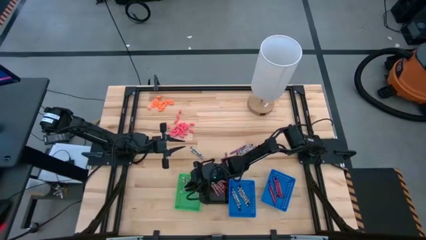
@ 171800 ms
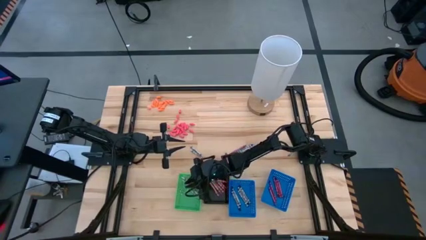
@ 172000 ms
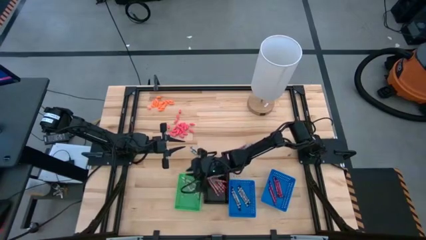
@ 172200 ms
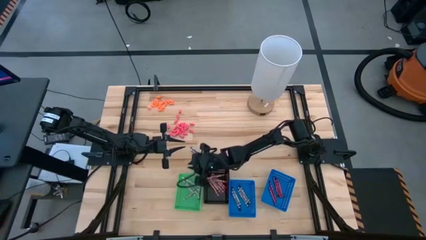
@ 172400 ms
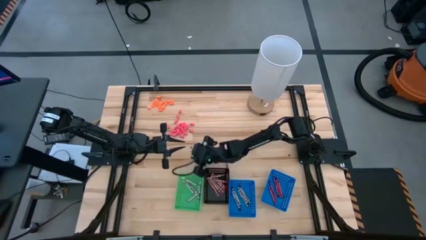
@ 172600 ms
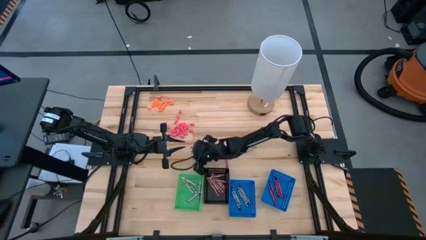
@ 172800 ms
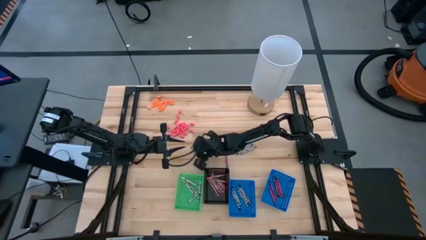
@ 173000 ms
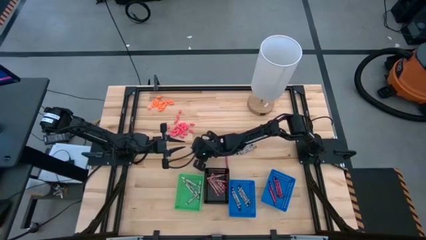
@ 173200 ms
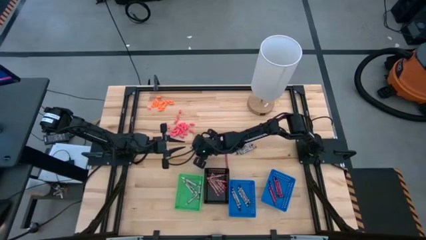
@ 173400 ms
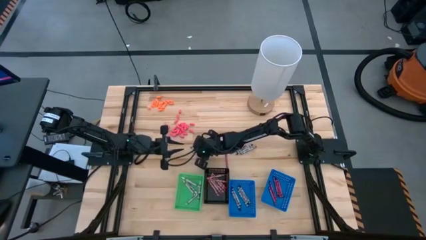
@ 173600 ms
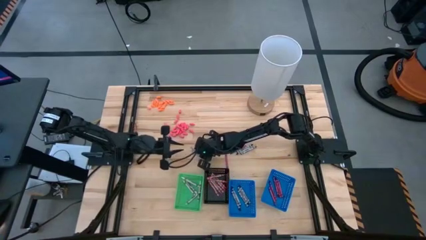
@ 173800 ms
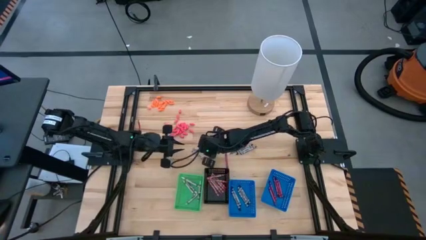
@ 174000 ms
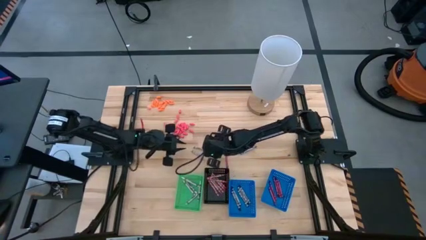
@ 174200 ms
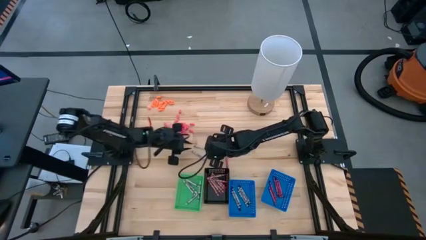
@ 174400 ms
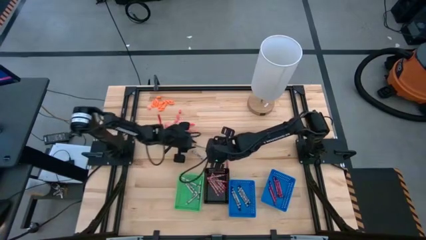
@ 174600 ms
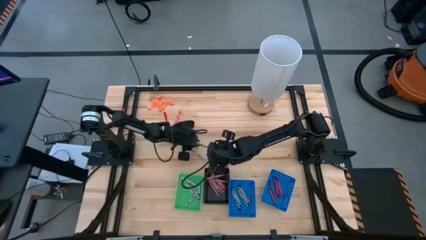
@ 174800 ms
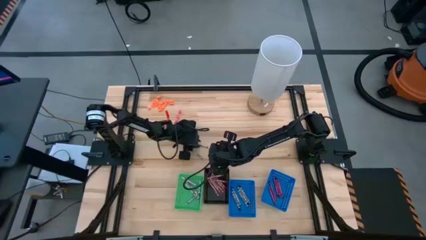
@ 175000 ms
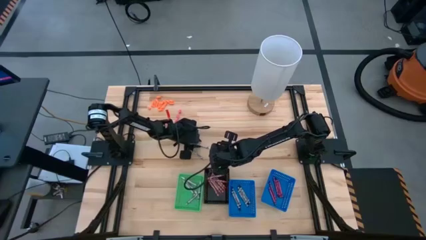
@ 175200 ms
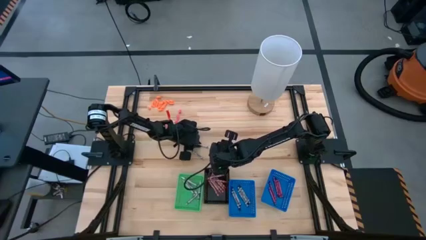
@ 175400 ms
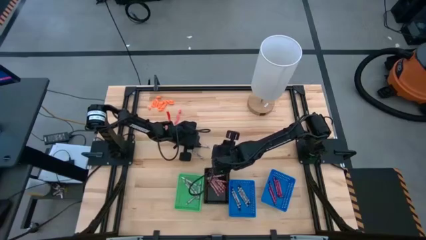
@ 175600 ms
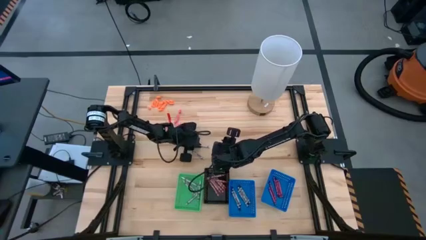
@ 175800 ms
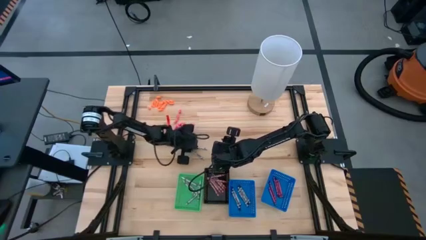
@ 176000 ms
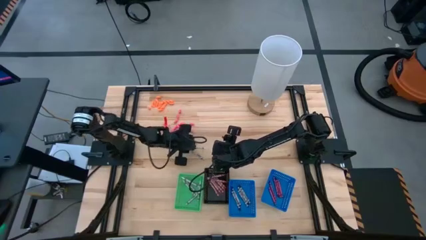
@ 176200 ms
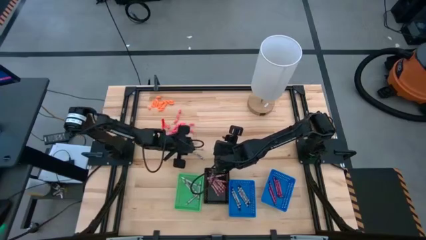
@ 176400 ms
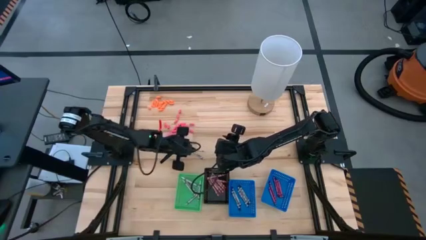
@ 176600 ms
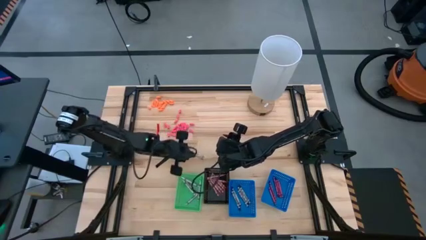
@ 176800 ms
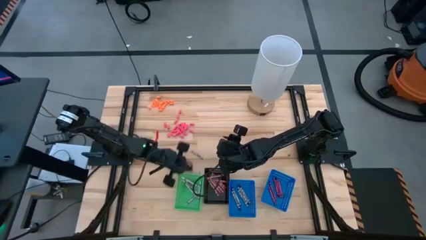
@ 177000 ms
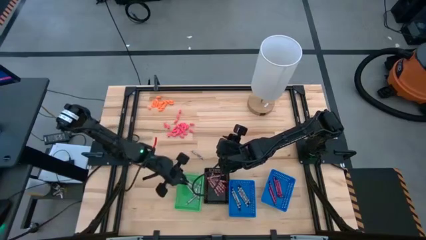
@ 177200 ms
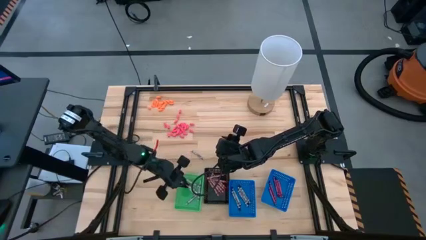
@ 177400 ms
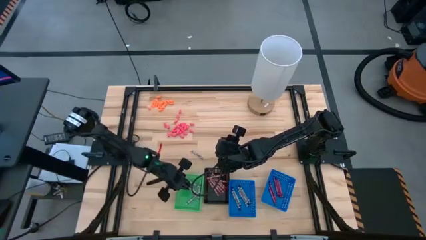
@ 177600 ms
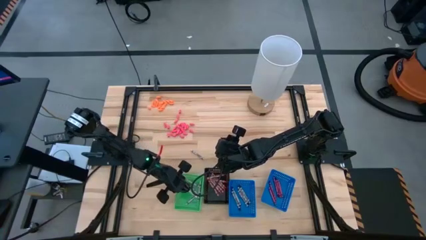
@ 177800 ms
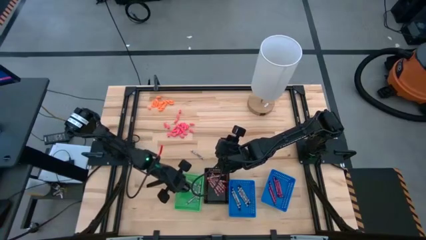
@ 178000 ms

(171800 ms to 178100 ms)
Task: Sort crayons
Put the white crayon into the green bin

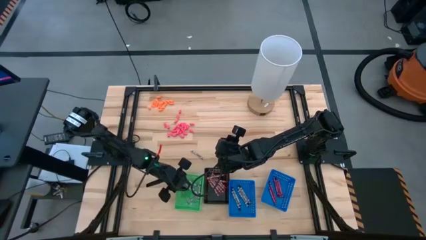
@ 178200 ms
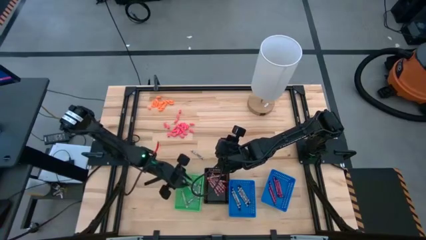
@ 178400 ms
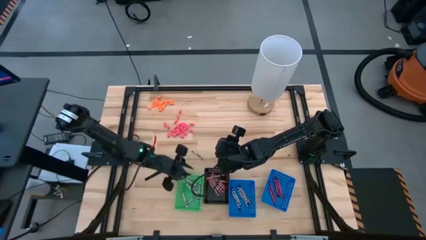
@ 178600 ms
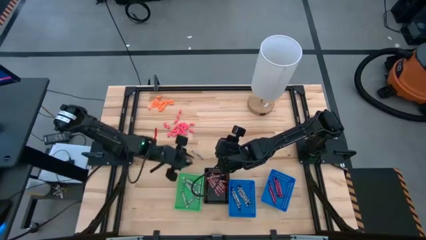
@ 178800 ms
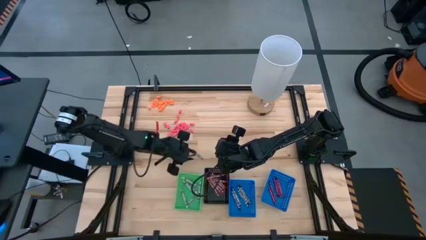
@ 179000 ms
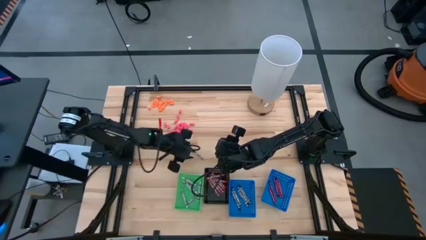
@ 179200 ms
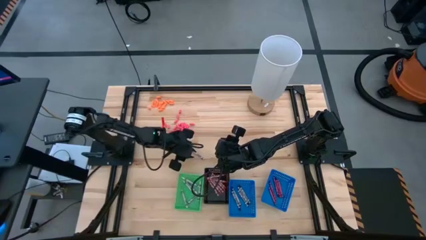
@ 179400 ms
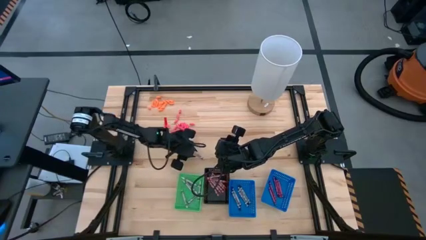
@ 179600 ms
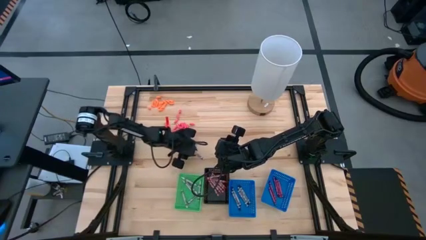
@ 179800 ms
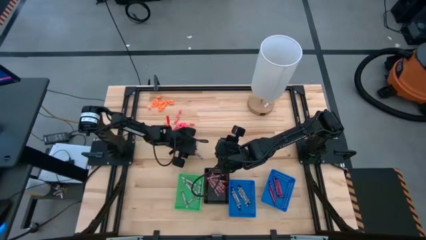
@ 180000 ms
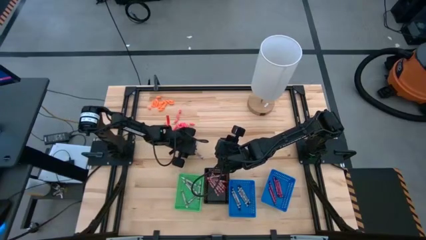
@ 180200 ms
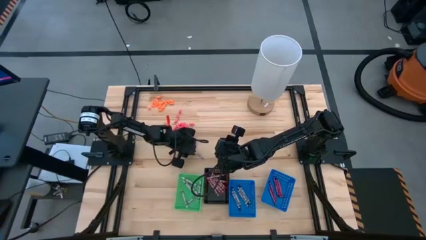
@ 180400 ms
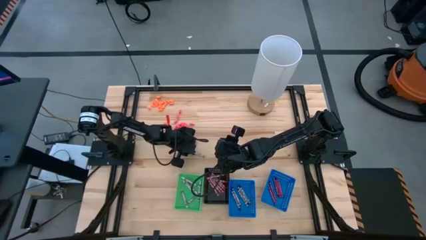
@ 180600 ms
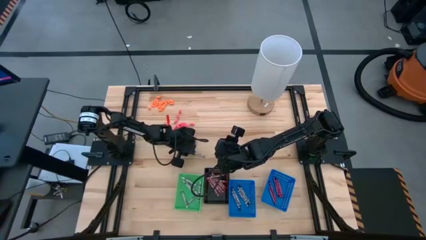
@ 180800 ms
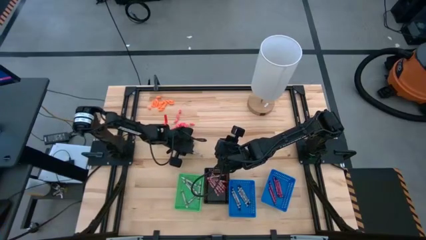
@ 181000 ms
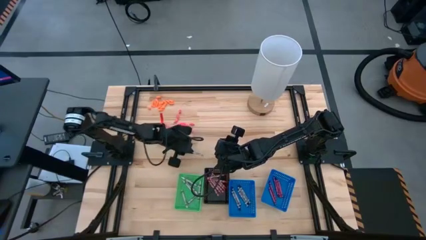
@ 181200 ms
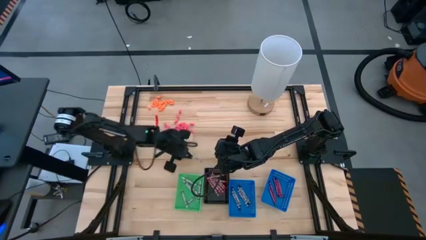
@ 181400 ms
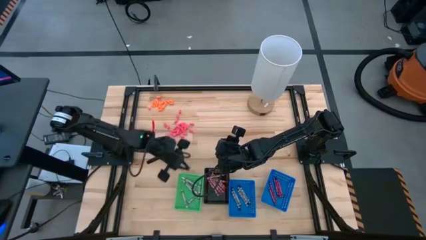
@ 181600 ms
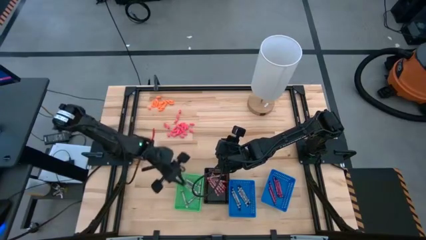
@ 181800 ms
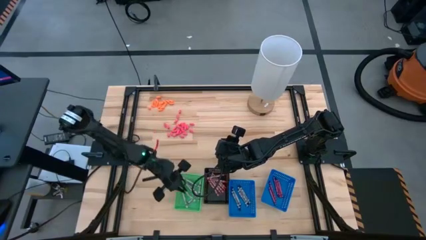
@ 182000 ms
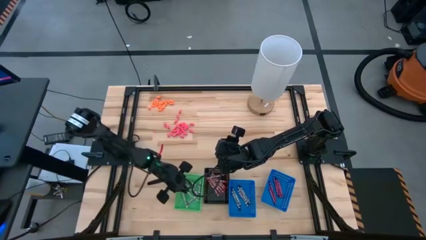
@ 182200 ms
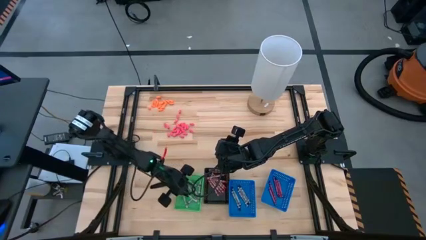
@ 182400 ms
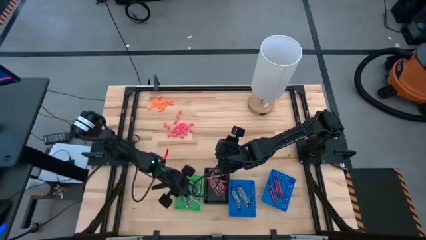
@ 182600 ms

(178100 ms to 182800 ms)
Put the white crayon into the green bin

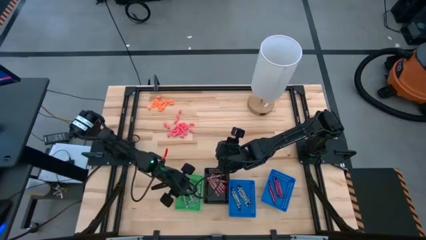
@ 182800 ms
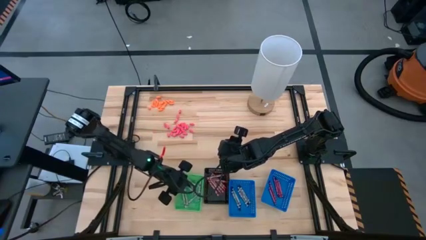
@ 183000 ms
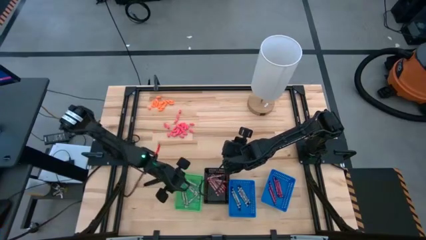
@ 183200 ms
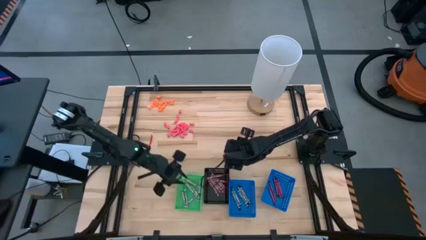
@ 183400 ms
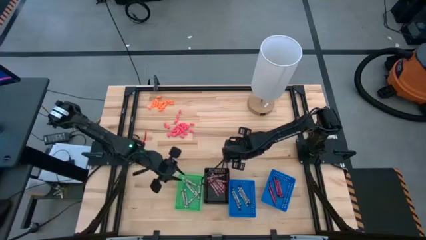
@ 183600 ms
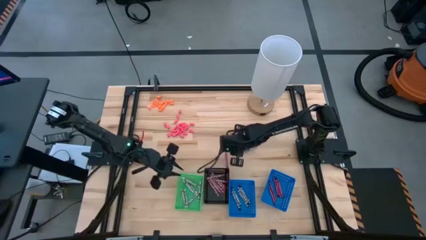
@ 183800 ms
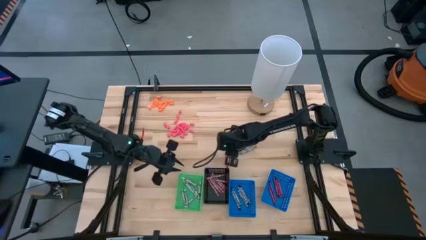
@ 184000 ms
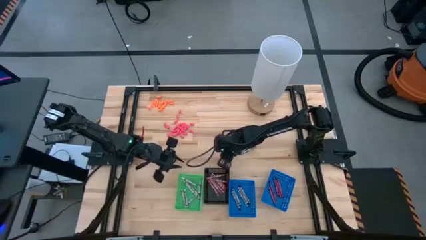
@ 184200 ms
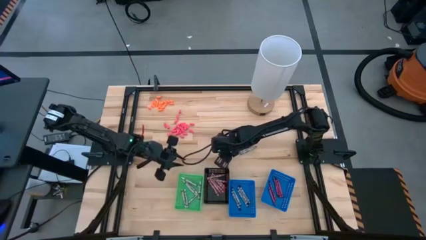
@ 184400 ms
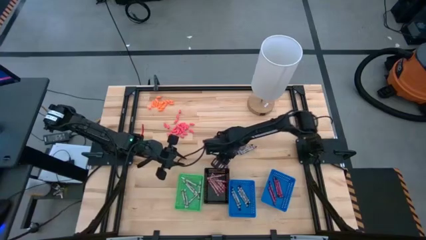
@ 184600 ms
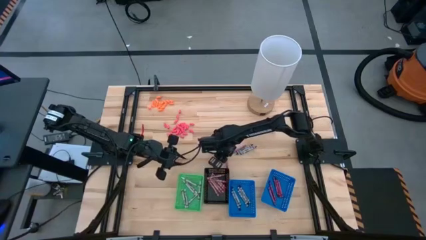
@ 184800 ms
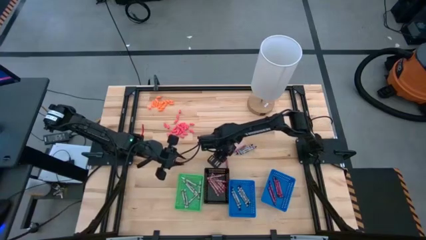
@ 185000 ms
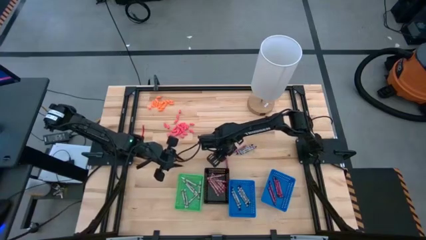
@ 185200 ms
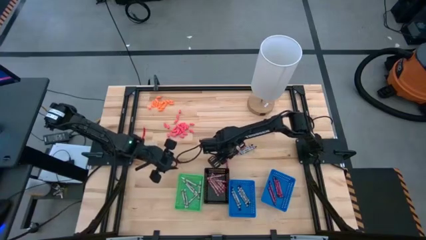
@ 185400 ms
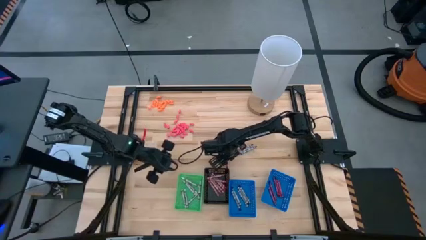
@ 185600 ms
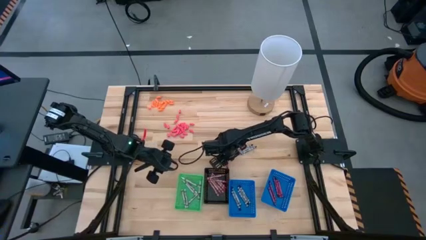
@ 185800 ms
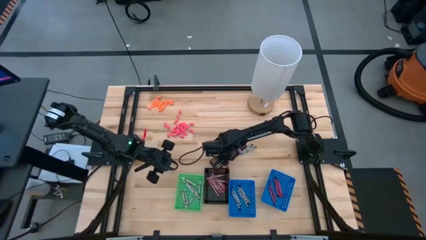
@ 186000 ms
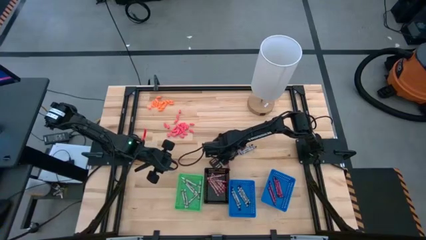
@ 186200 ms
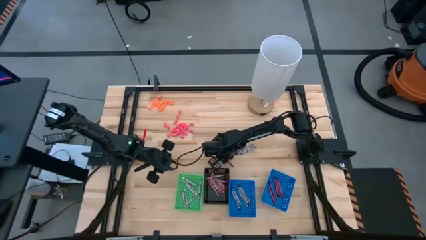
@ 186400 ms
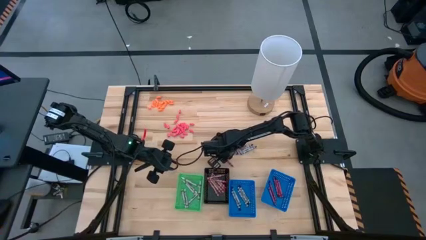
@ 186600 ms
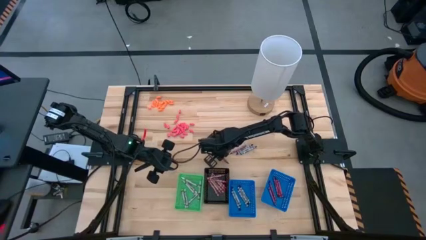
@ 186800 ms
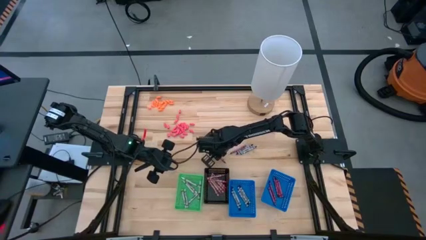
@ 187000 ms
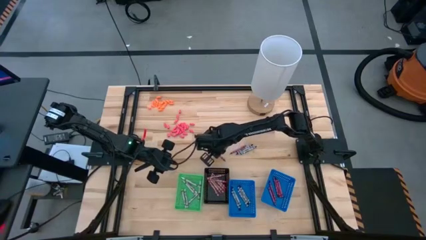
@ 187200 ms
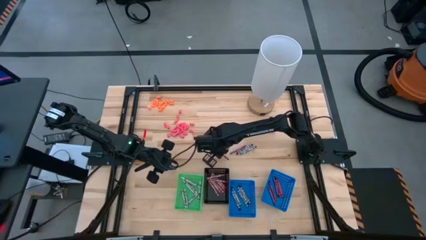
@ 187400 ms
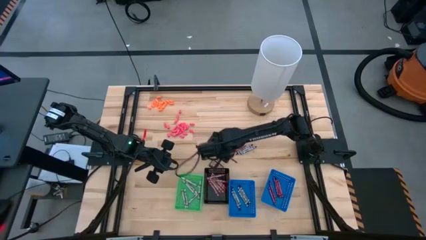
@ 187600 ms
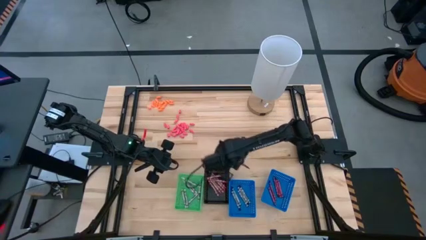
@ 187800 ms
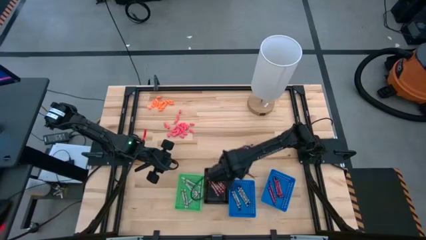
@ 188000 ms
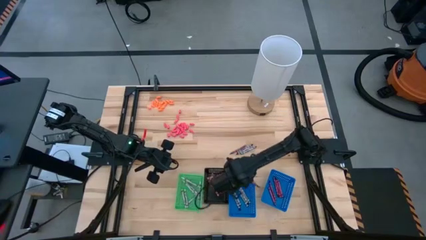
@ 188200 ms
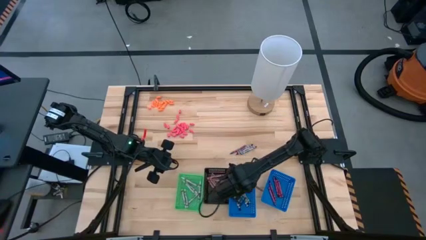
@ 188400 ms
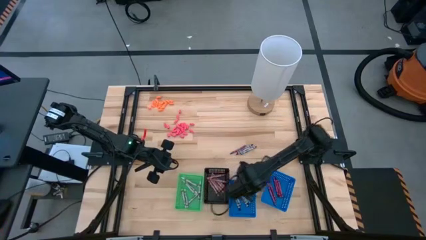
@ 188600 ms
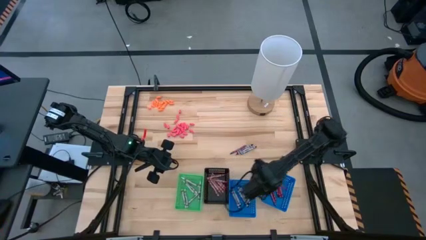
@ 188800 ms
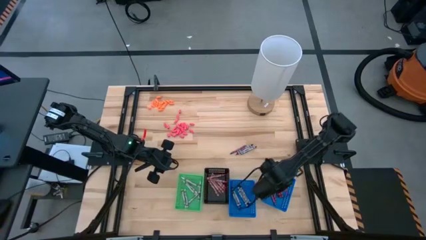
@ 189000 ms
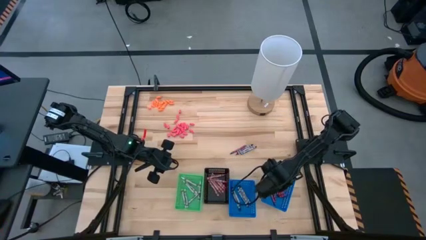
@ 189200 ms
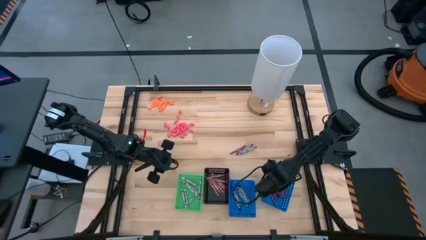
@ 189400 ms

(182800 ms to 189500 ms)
Put the red crayon into the right blue bin
